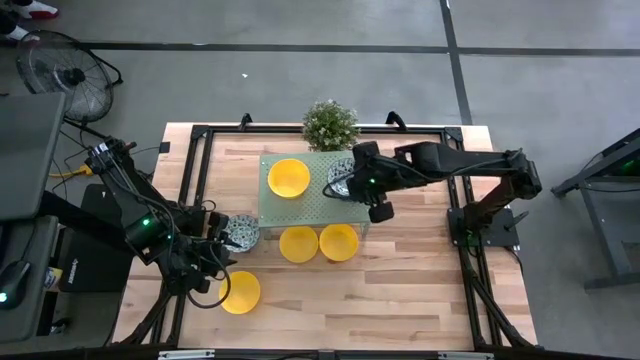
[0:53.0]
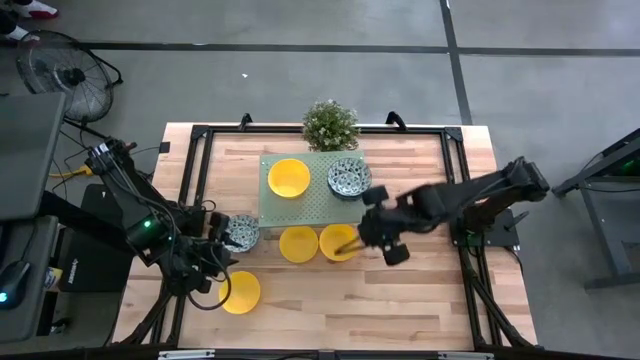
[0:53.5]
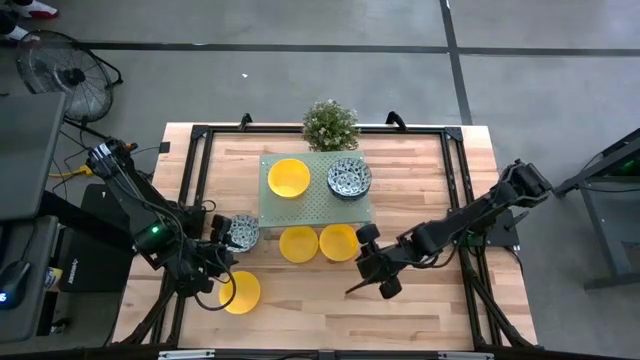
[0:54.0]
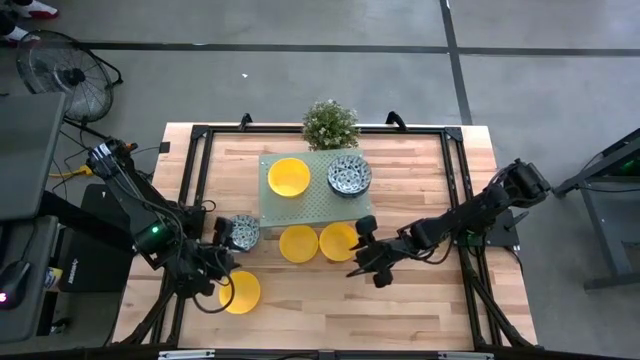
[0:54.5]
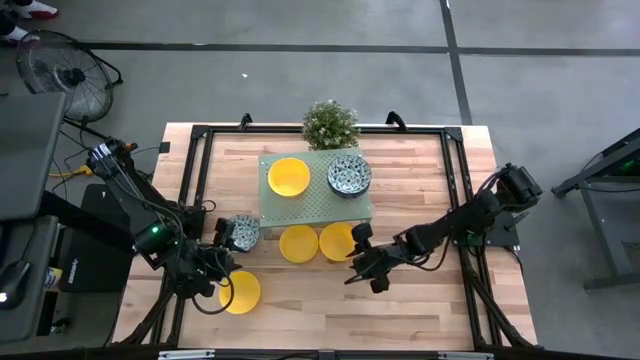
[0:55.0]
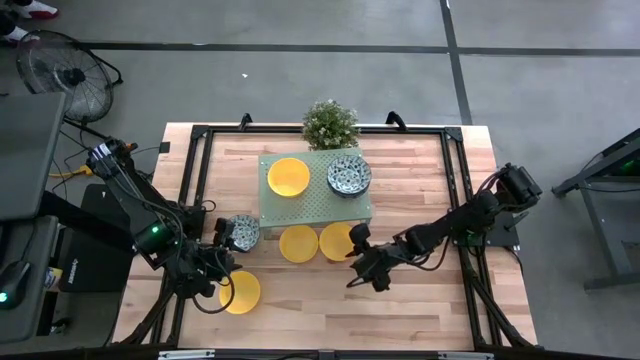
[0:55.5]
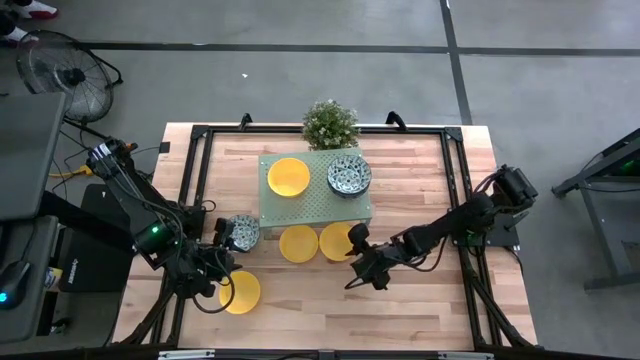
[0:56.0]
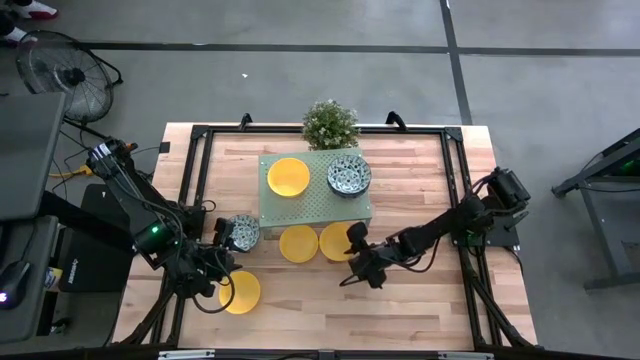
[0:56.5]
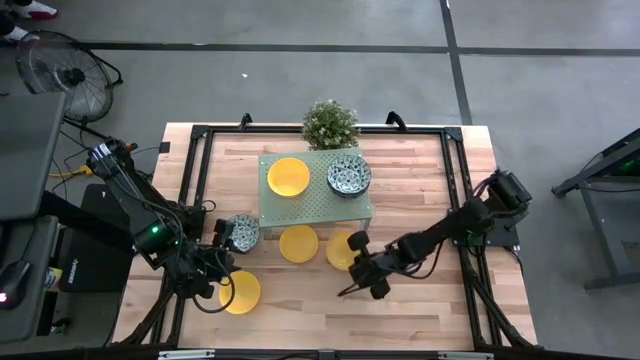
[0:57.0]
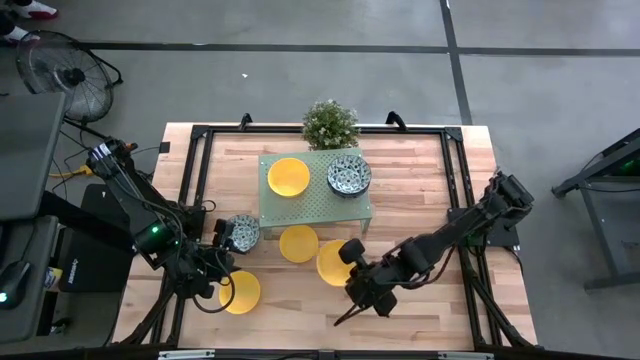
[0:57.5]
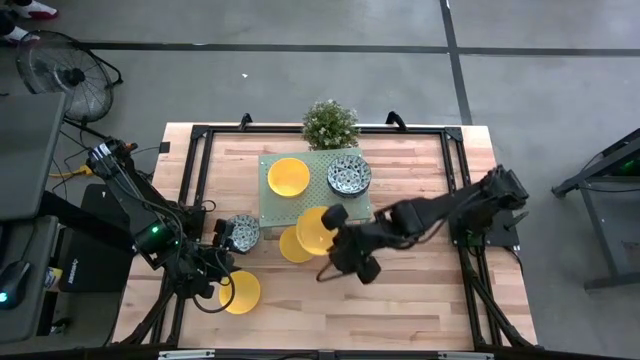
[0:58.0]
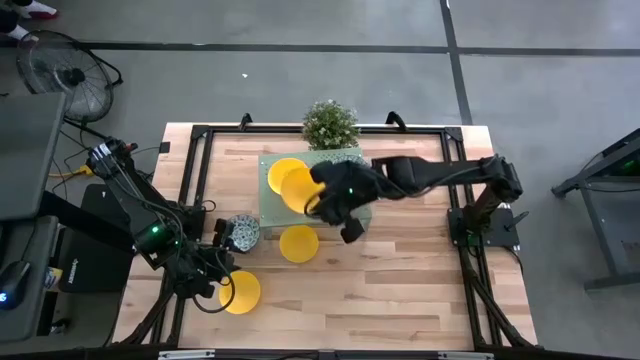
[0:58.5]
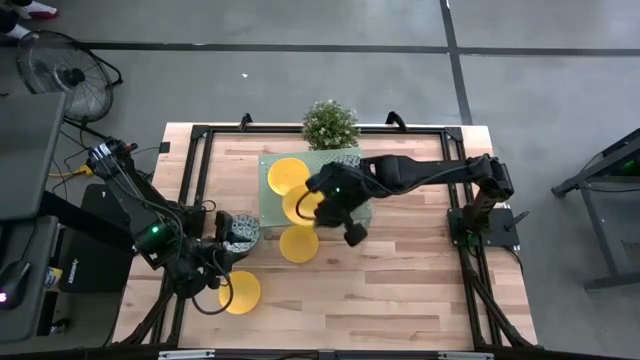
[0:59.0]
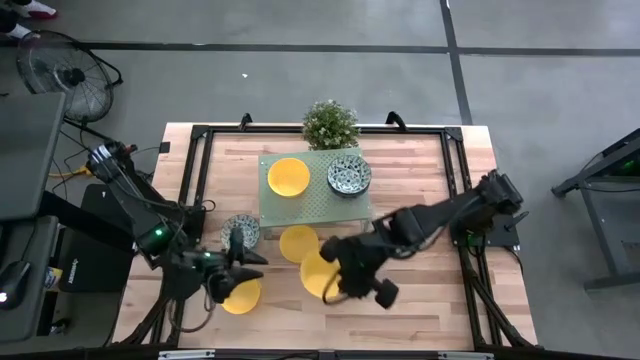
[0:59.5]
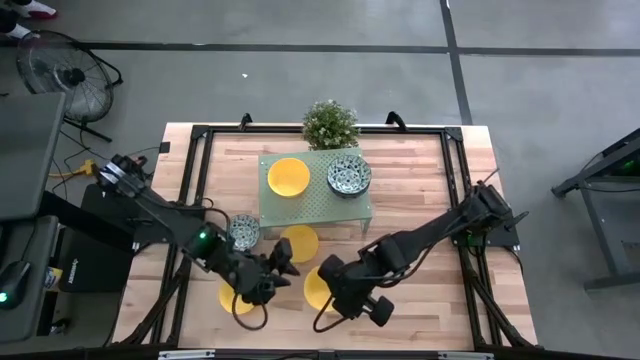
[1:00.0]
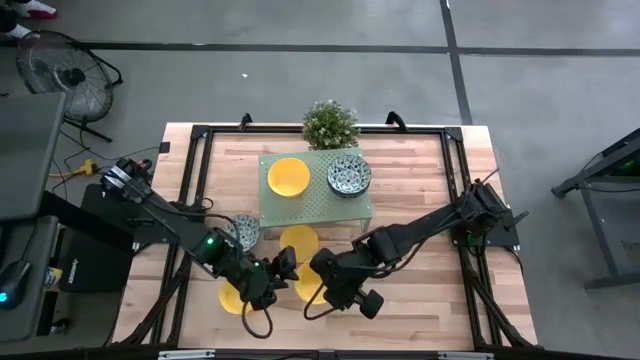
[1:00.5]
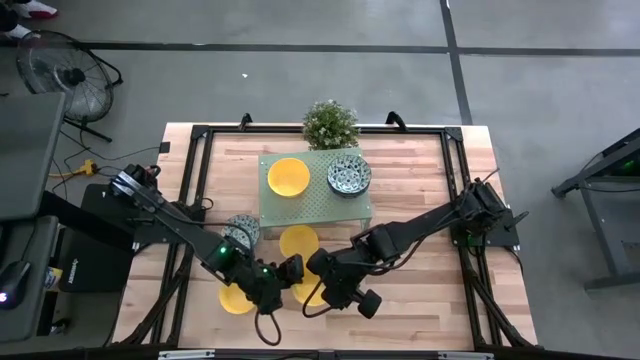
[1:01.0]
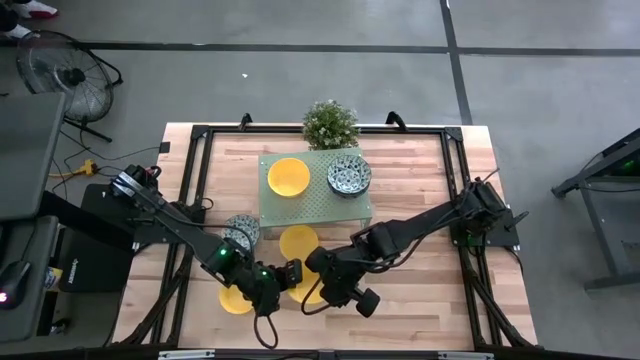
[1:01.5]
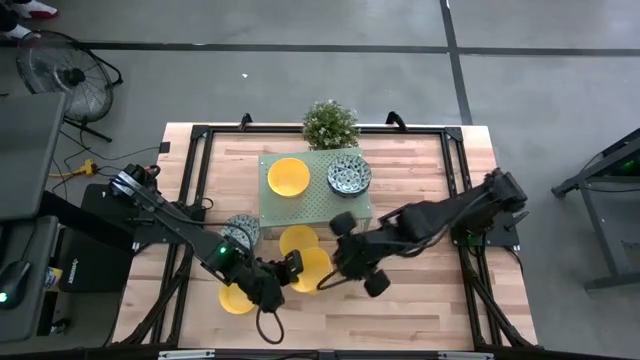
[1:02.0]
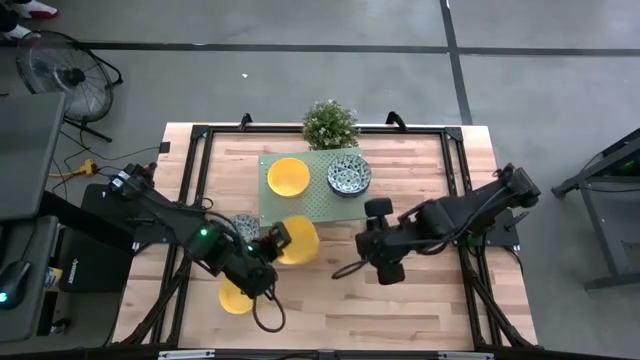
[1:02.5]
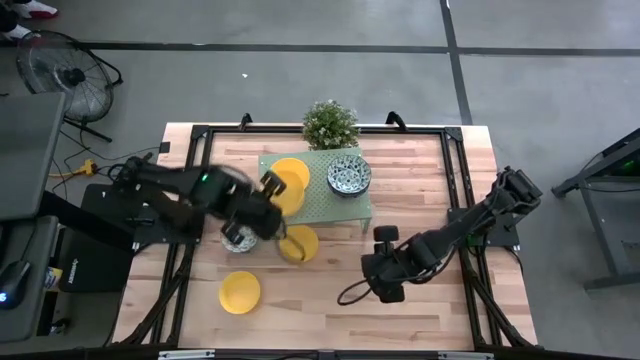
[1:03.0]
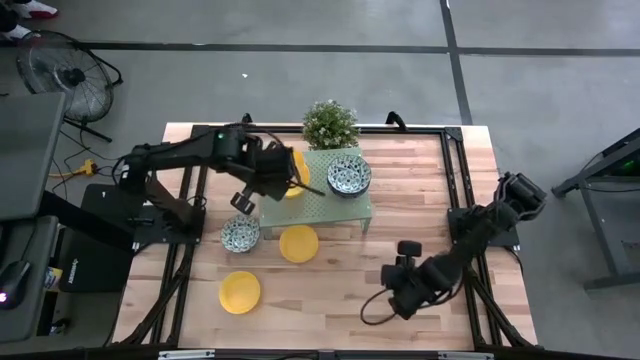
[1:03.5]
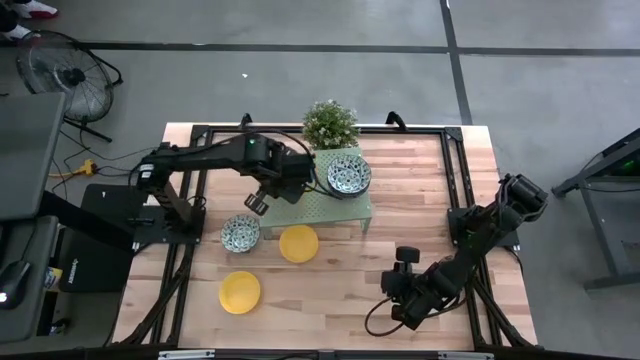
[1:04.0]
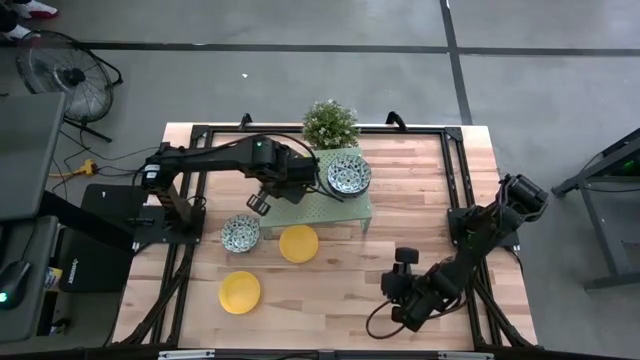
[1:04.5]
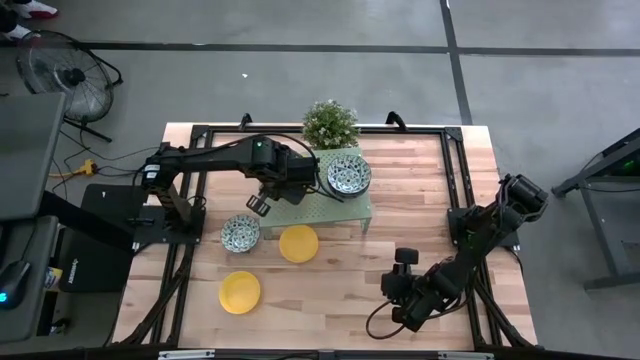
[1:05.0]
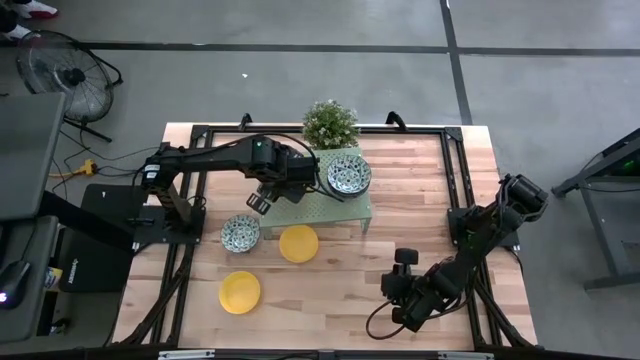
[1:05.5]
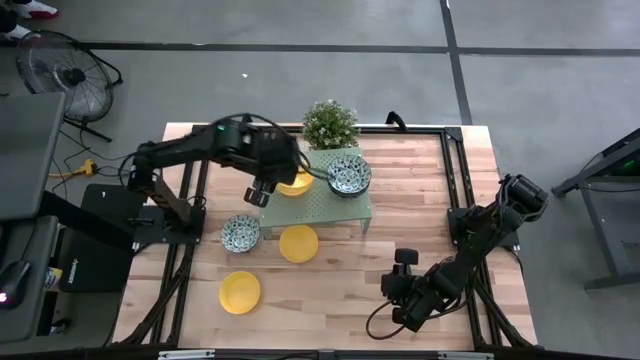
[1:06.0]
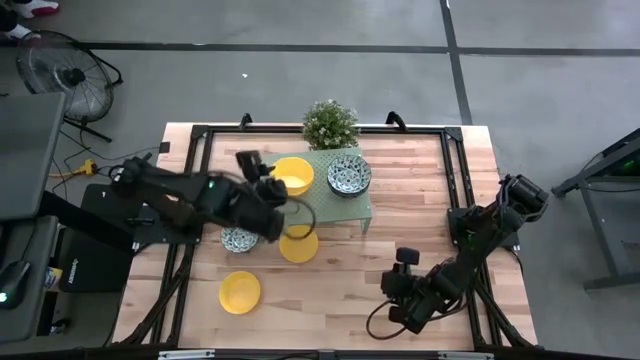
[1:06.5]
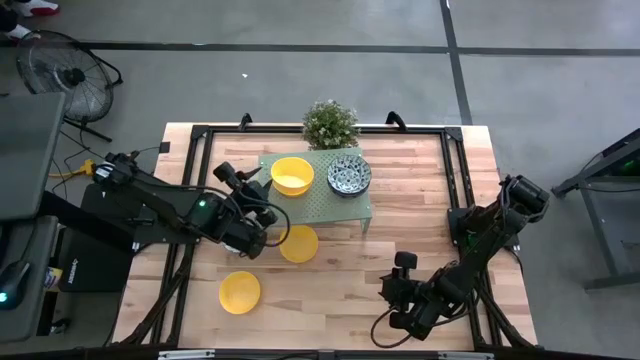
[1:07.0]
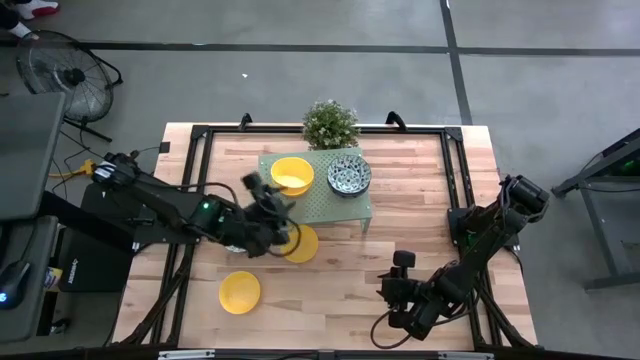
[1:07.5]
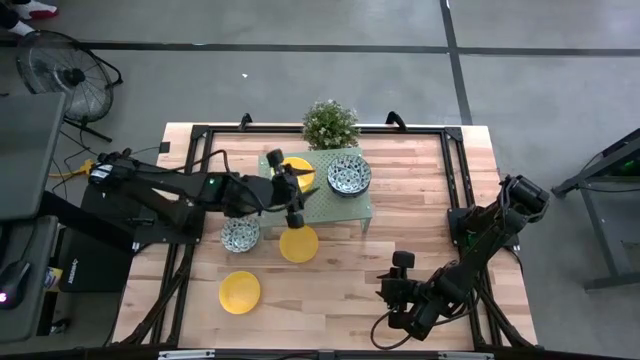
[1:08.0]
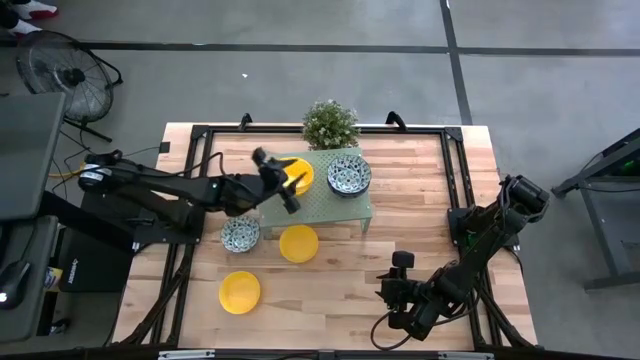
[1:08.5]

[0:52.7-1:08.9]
Task: Pick & Place Mini bowls
Stack the yellow bowl on top of the yellow bowl on the shelf
